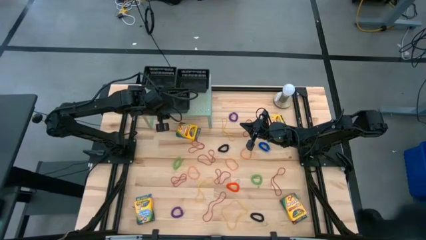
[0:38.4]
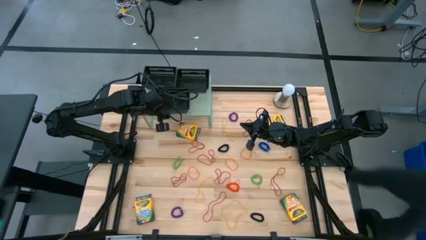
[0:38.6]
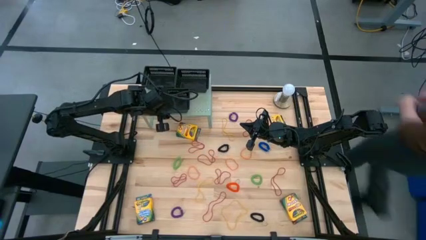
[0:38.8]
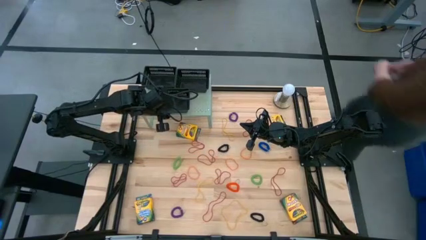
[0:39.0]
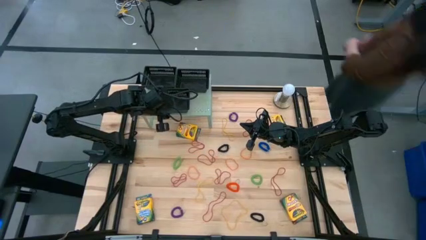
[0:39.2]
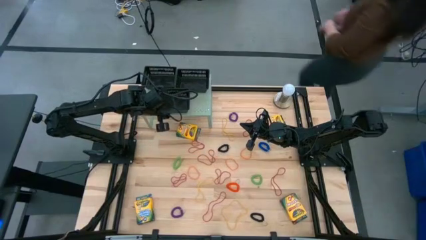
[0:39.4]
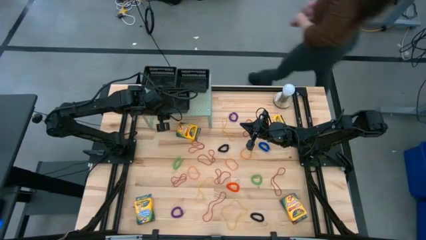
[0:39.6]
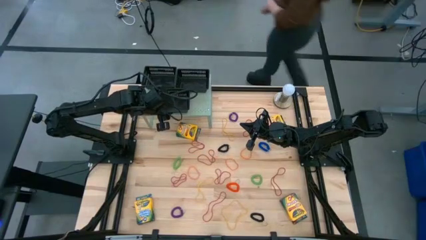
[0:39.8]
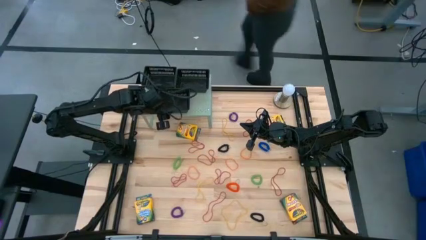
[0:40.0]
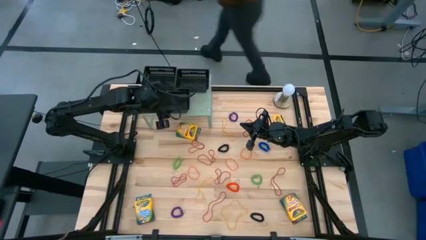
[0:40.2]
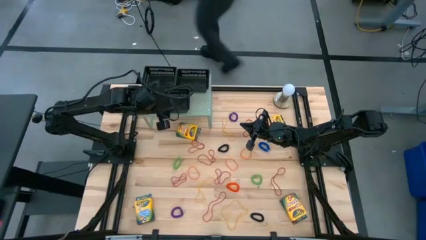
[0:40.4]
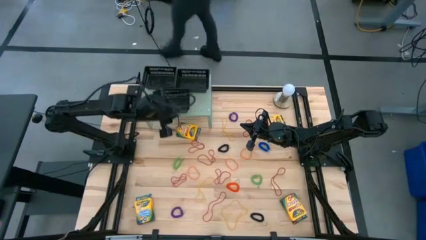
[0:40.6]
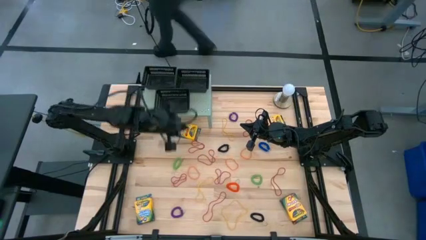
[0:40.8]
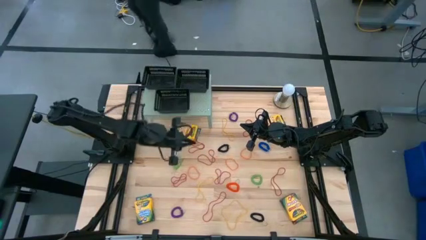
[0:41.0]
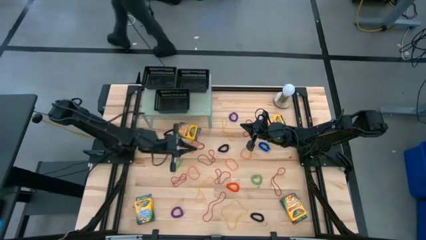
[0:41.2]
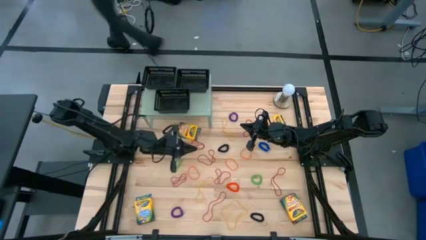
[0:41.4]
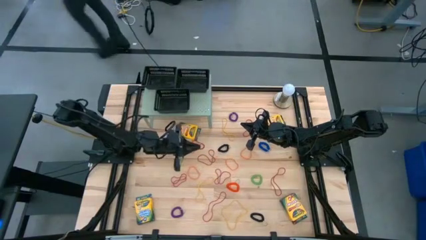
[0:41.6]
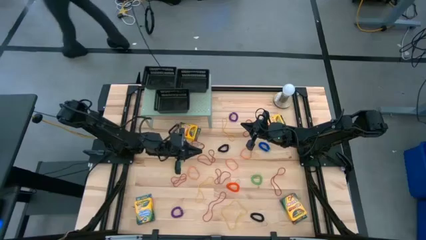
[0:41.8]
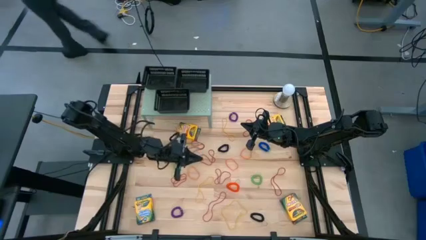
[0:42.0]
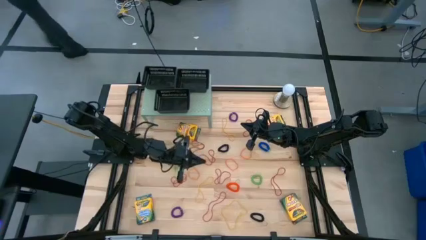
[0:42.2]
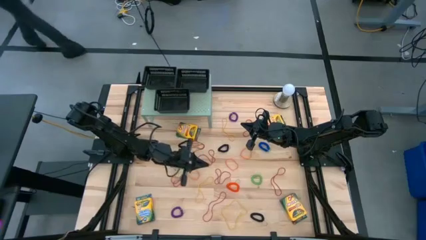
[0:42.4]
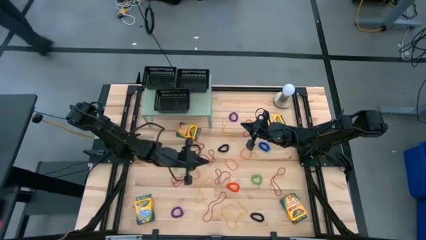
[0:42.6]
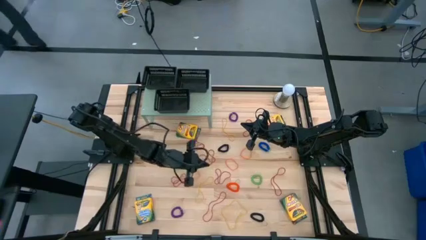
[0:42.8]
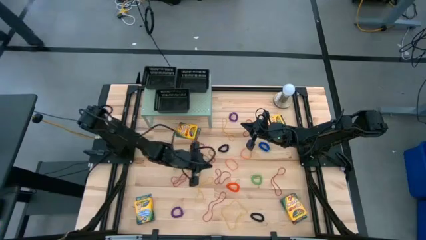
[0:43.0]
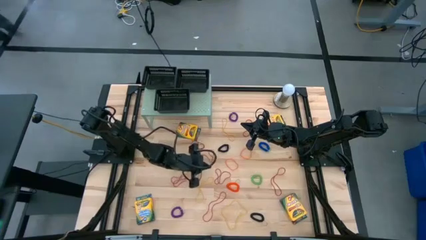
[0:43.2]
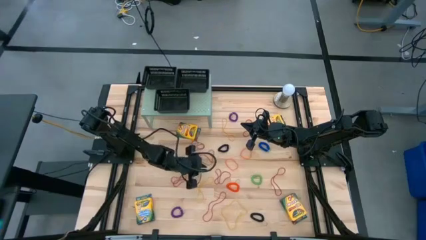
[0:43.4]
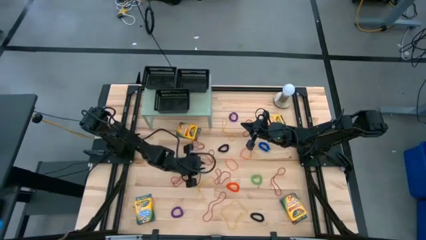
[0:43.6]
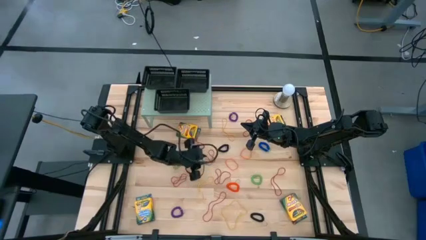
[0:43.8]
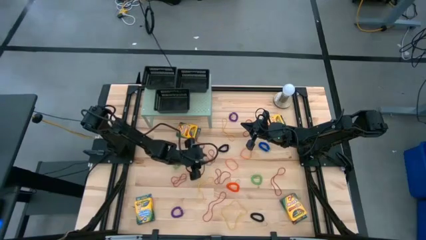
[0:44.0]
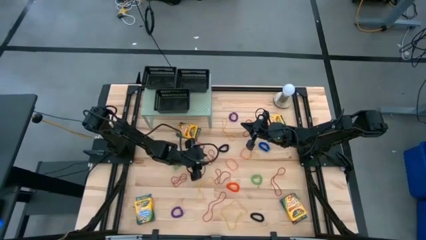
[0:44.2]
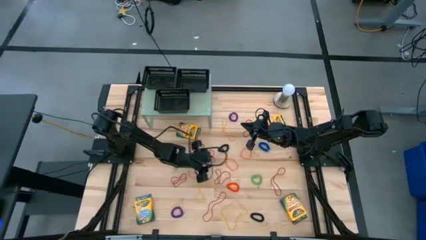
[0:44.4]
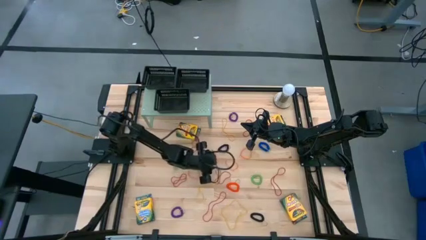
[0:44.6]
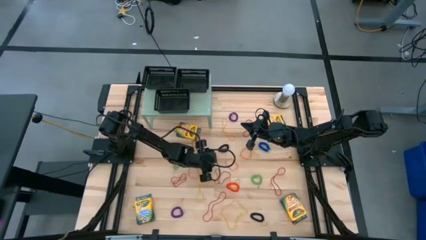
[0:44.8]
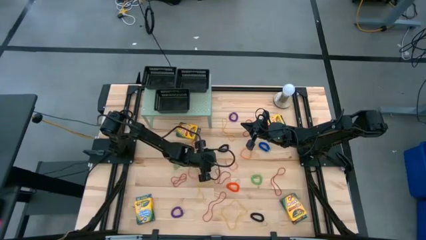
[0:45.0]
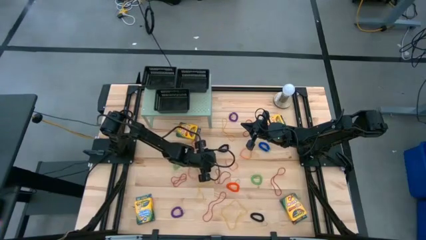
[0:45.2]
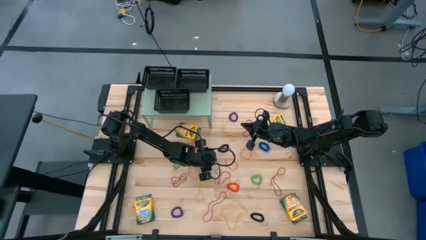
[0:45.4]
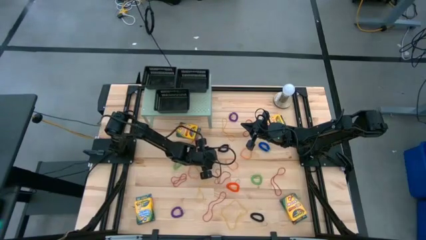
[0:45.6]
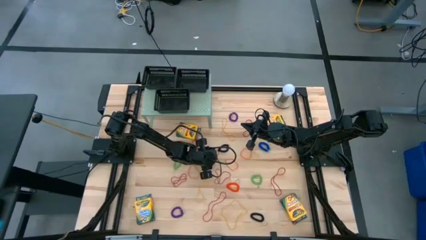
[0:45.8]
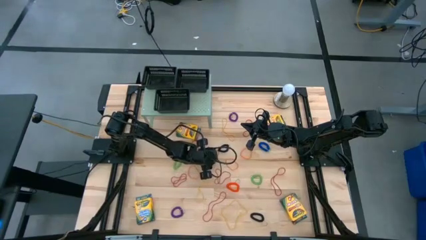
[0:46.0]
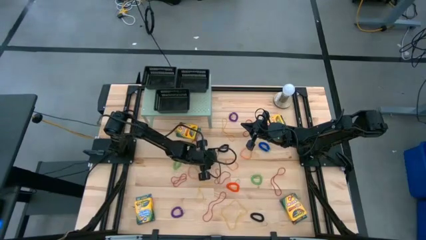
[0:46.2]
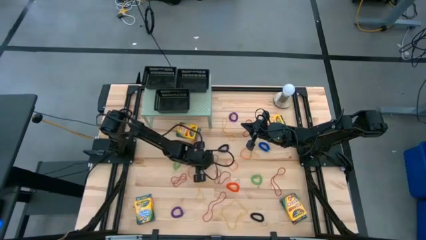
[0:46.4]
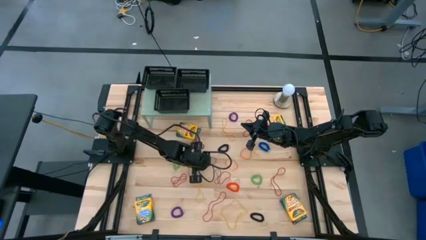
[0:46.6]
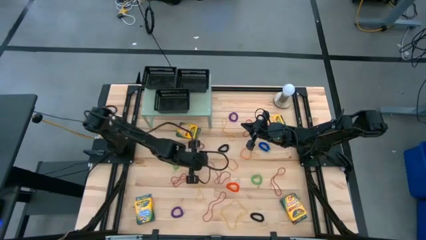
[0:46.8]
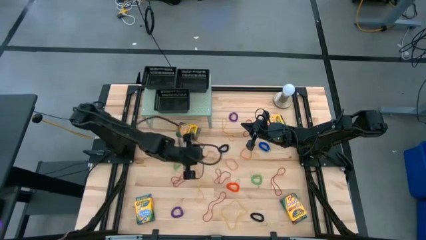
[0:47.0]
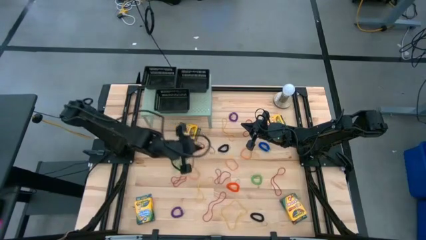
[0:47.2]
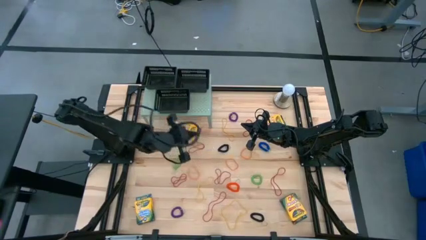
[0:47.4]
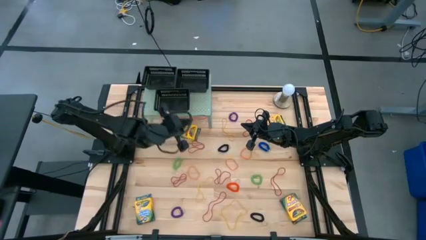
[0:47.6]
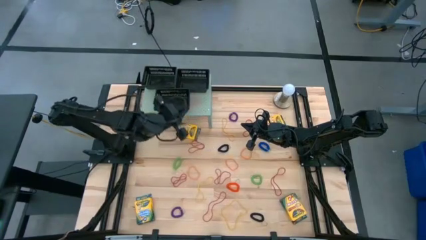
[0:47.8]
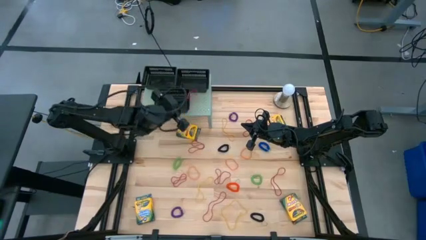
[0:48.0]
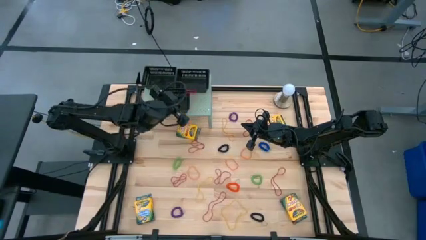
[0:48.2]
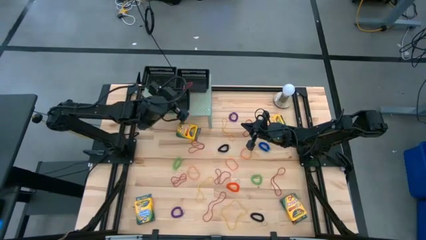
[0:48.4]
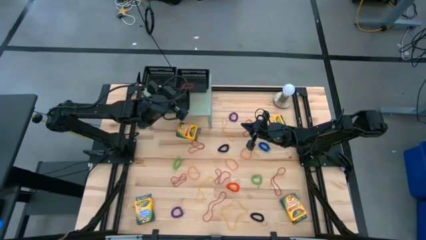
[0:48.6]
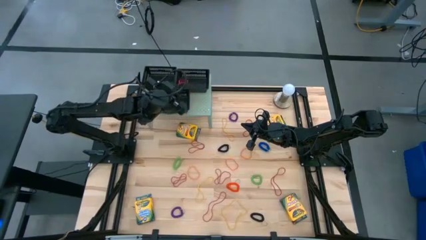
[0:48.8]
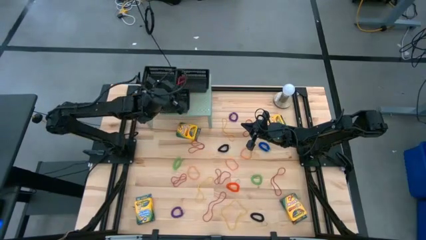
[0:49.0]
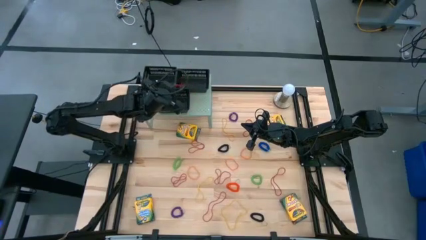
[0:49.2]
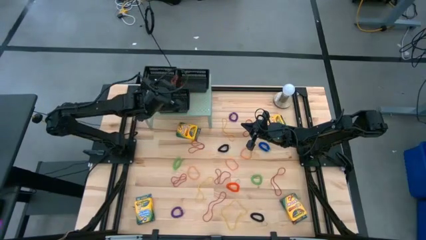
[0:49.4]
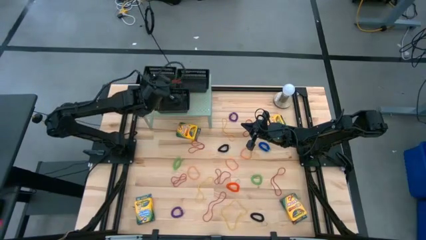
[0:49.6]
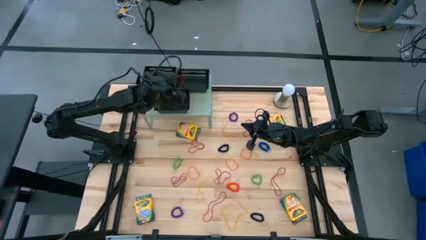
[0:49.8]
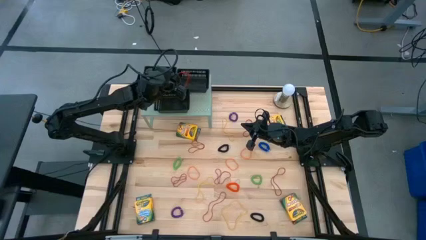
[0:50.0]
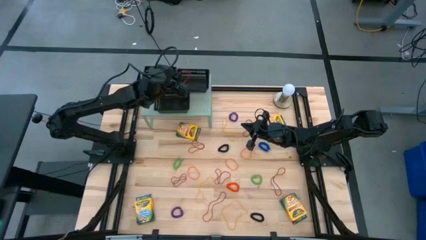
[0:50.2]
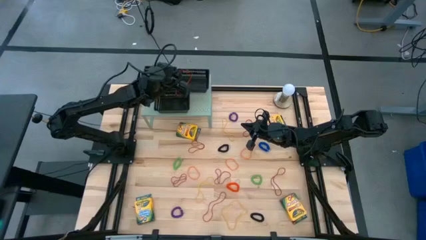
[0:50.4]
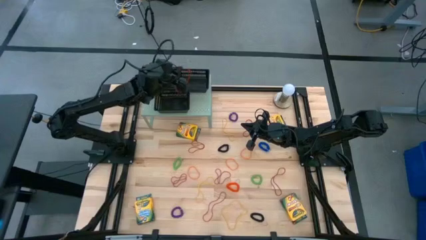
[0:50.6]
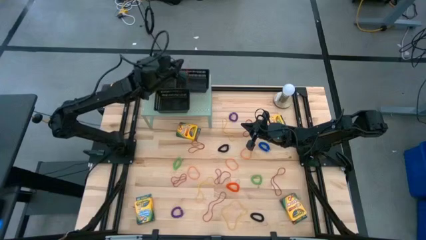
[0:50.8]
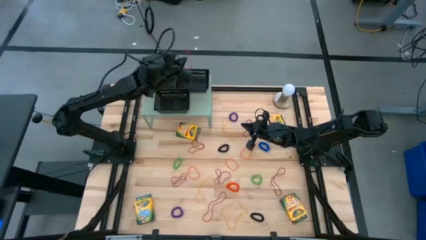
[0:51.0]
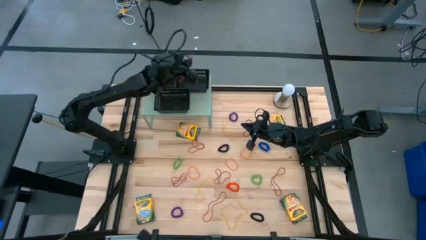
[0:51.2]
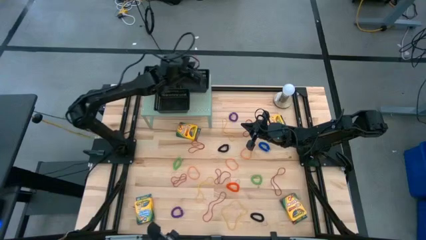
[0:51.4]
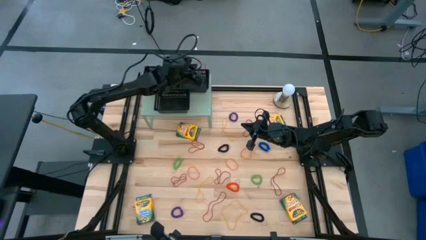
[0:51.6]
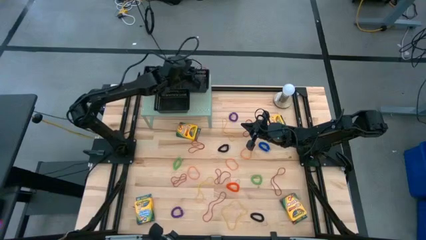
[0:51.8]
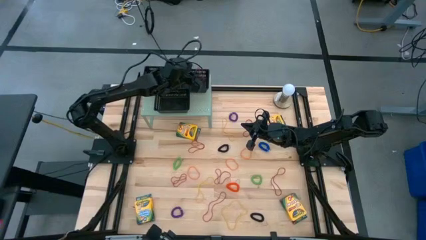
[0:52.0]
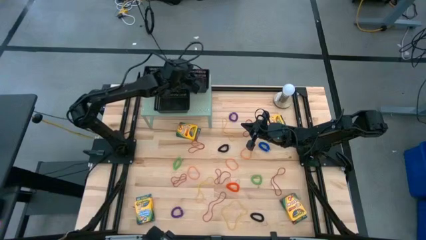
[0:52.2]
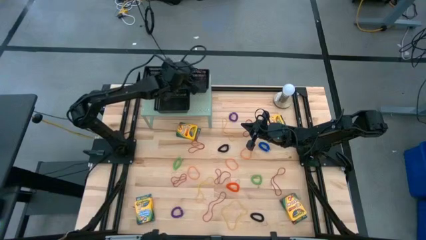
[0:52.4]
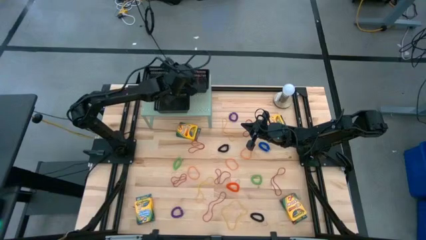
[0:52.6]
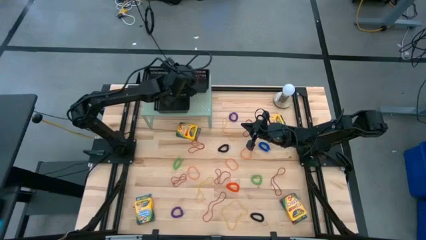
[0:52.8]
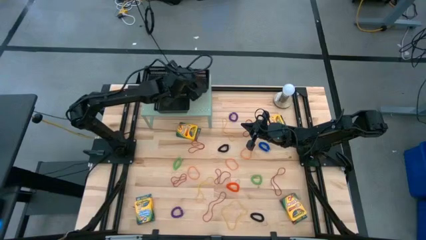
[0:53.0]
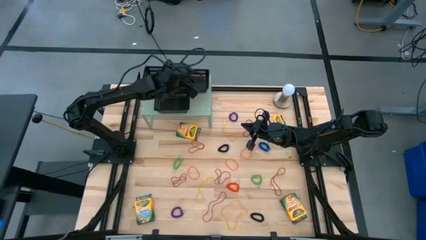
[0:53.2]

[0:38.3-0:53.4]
Task: Pick & Place Office Desk Supplies
Put the red rubber band into the right black bin

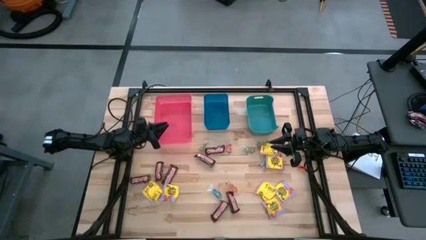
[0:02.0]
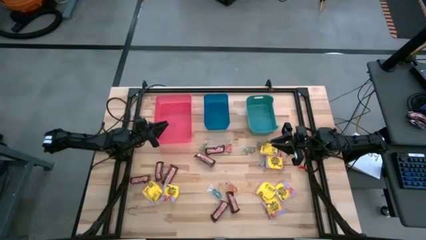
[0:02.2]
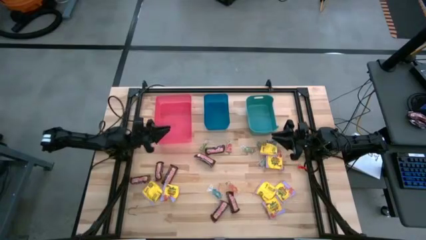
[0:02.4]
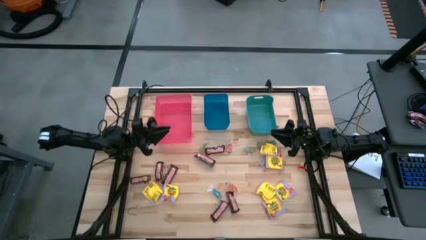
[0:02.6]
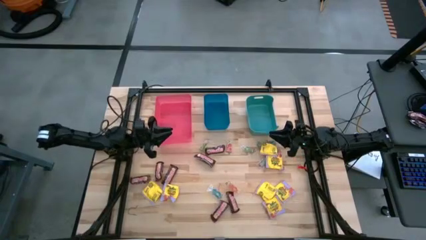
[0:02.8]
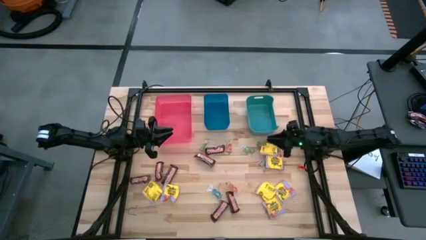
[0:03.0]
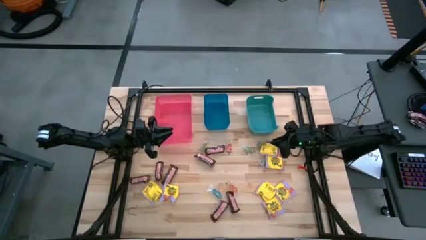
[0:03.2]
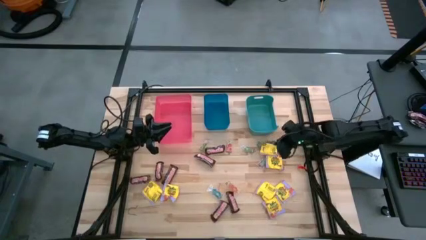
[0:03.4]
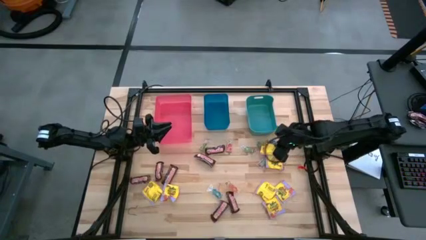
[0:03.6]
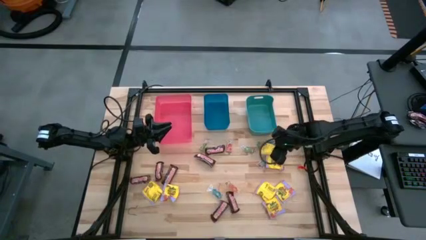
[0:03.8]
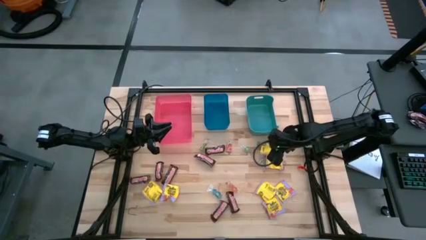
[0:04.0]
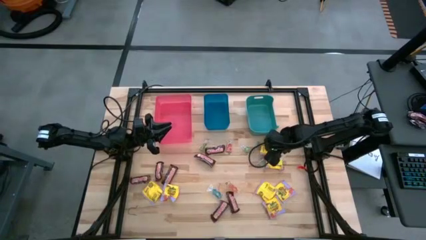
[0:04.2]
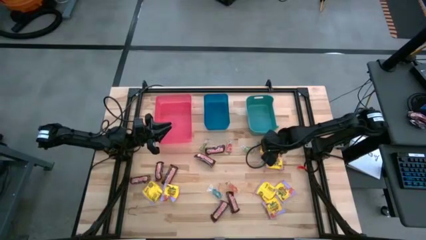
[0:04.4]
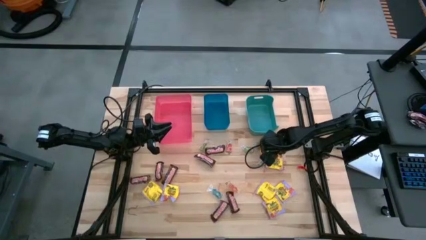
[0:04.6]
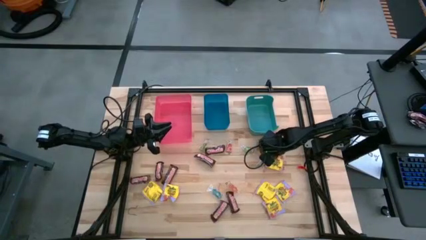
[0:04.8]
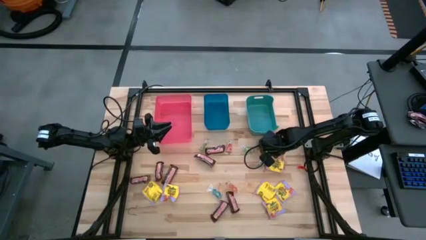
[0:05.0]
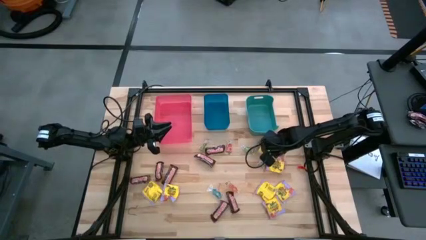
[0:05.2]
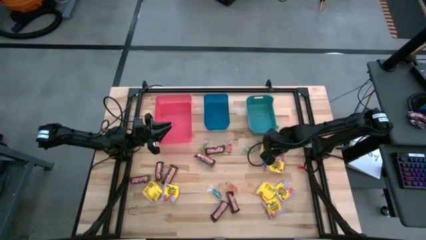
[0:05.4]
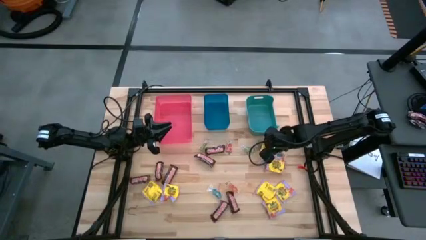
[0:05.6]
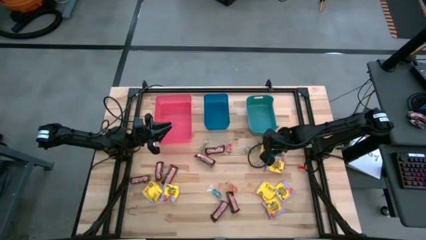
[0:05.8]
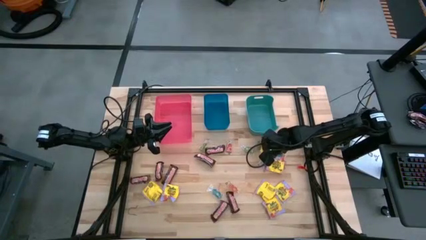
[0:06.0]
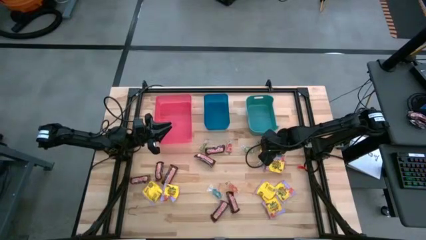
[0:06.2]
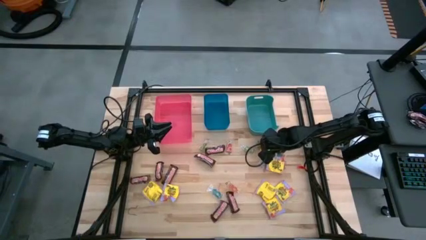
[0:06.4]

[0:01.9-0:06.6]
Task: Sort candy
Put the yellow candy into the blue bin
